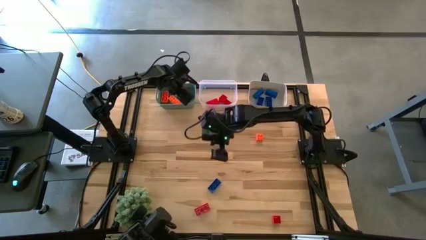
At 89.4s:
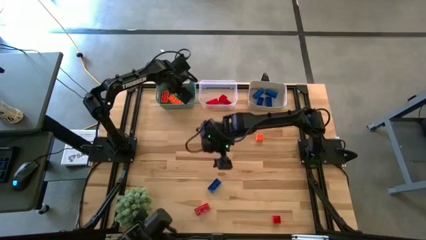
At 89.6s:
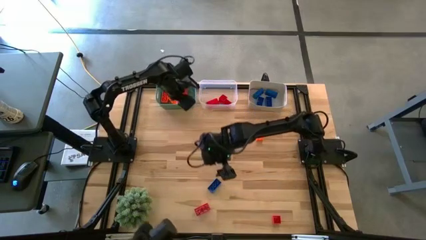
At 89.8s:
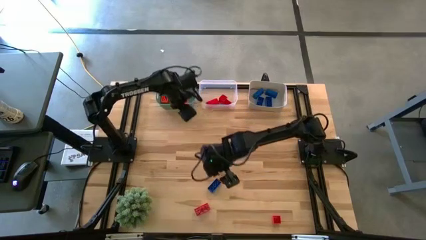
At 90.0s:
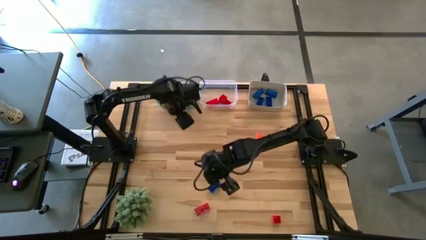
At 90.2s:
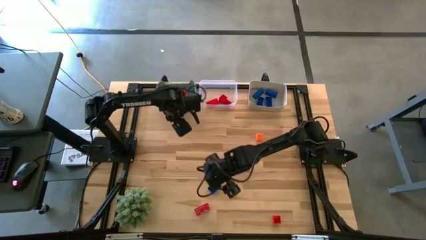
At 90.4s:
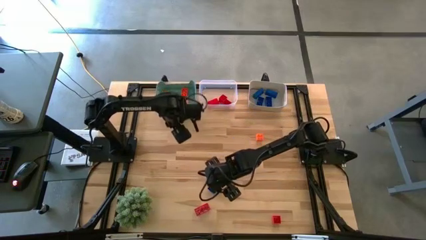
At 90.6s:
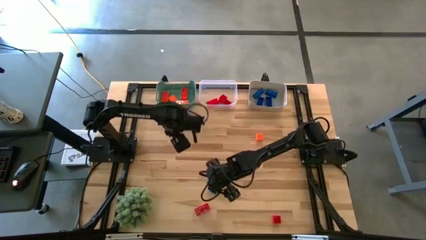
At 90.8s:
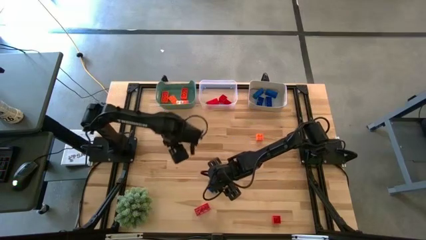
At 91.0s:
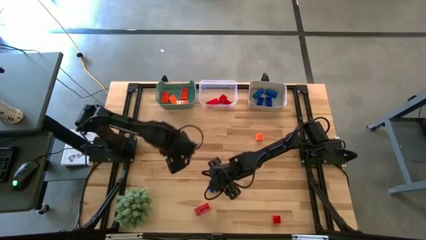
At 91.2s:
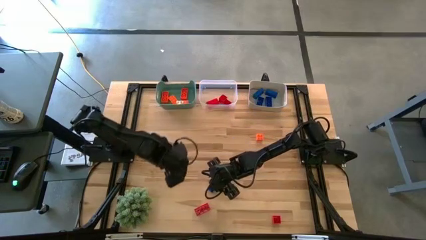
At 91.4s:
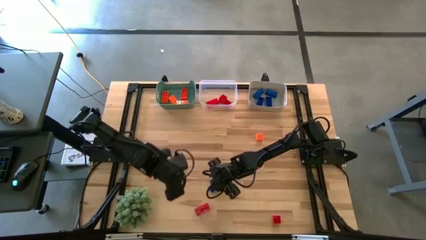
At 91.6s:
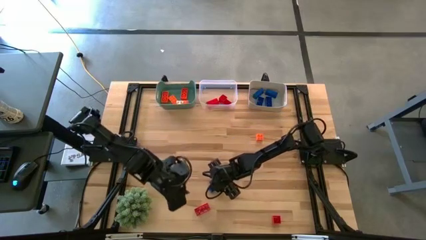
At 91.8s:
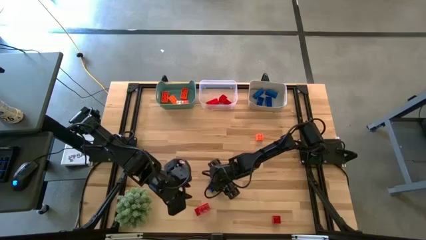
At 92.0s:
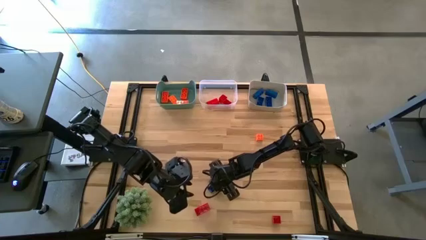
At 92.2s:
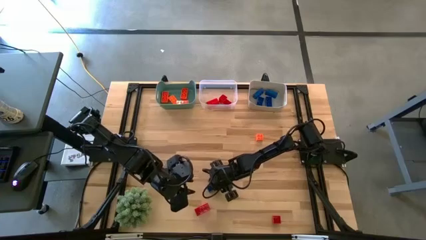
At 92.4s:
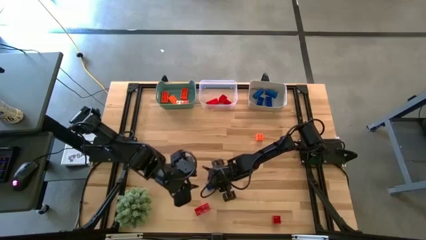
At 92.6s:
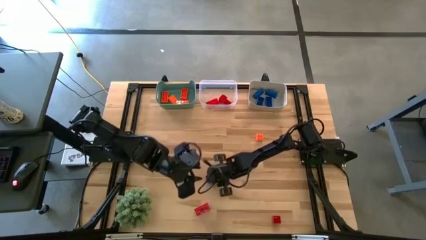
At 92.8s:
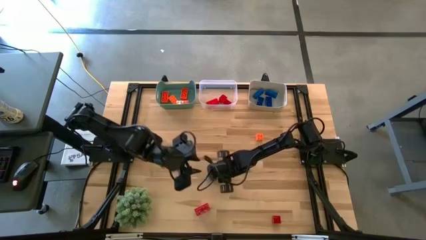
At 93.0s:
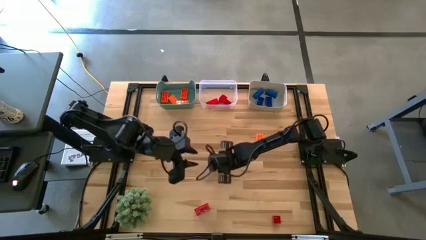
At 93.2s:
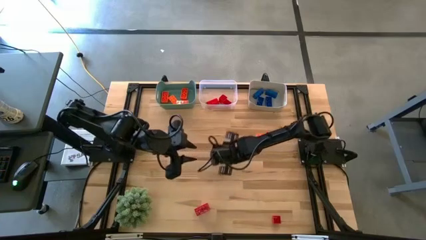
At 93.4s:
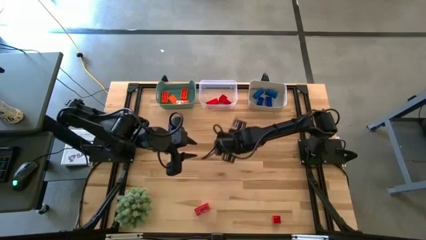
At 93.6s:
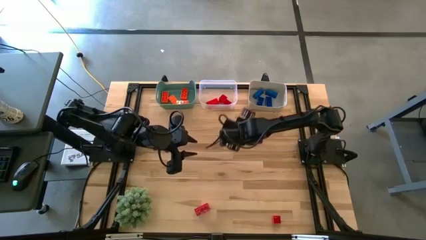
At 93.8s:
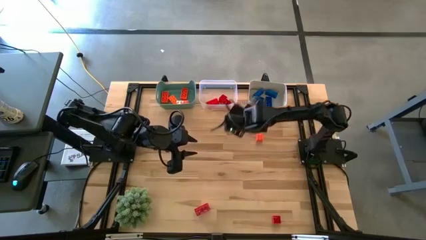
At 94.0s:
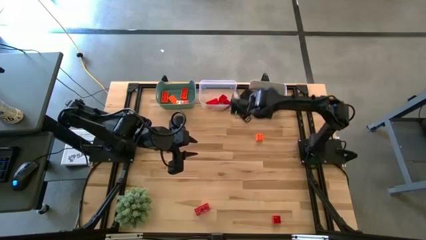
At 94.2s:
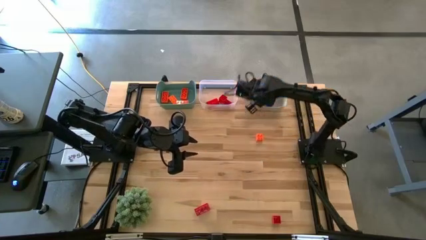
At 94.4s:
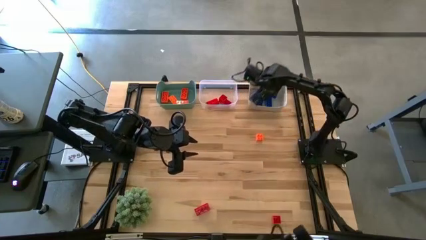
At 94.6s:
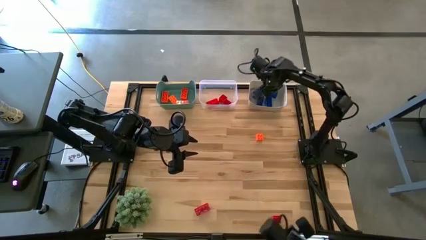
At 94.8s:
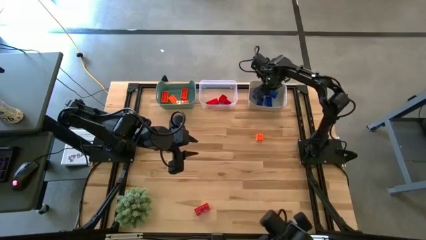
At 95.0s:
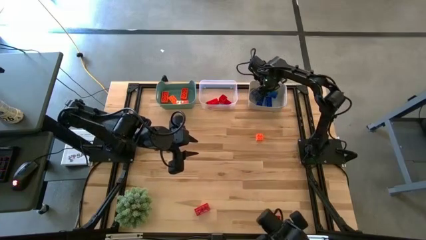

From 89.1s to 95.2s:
Task: Sort & place blocks by color
Put the blue game piece into the gray bin

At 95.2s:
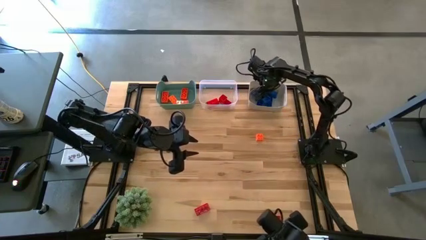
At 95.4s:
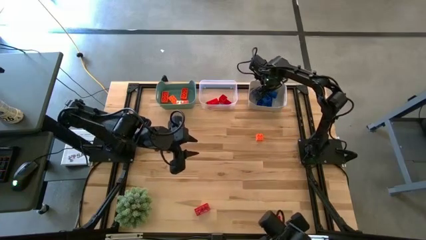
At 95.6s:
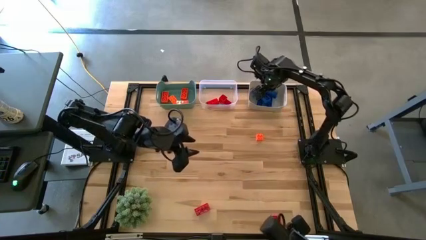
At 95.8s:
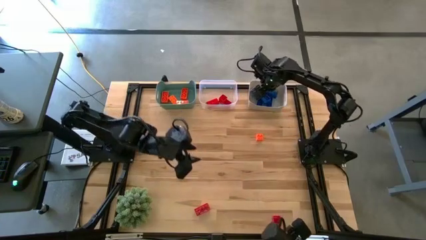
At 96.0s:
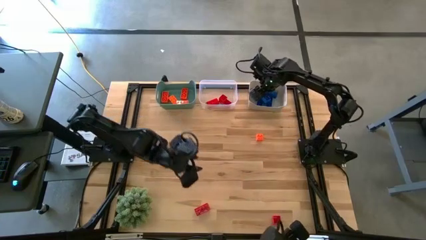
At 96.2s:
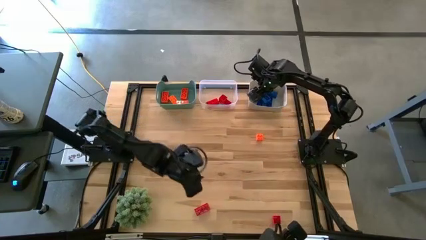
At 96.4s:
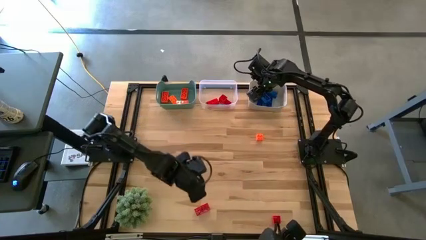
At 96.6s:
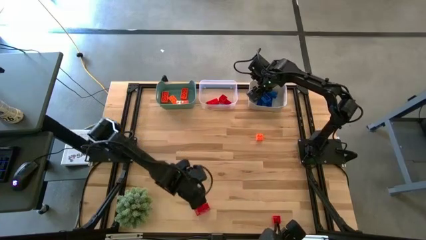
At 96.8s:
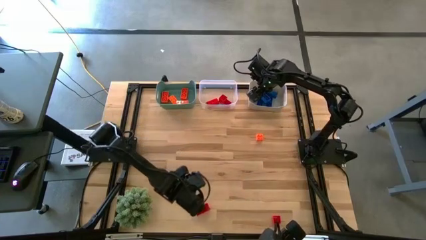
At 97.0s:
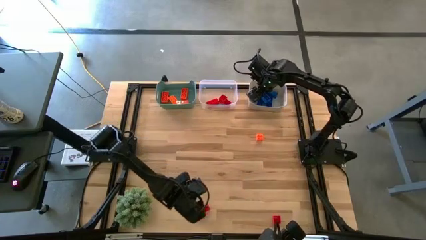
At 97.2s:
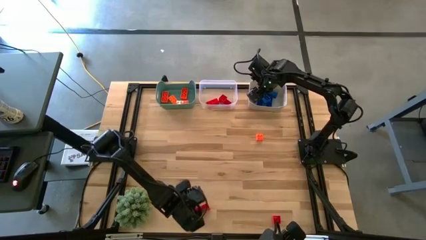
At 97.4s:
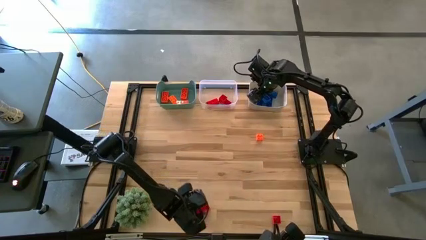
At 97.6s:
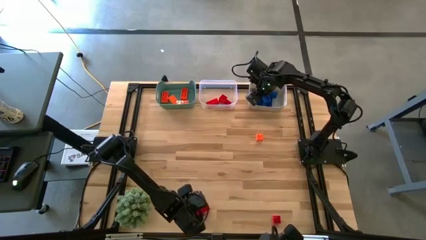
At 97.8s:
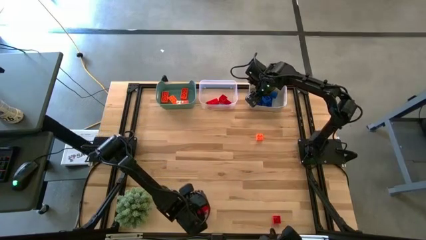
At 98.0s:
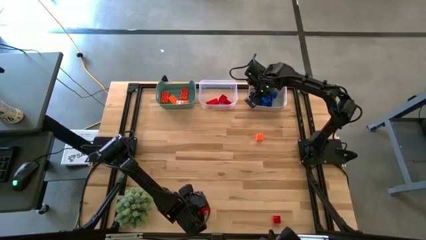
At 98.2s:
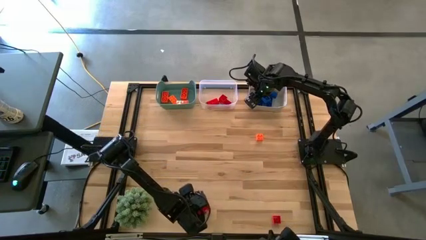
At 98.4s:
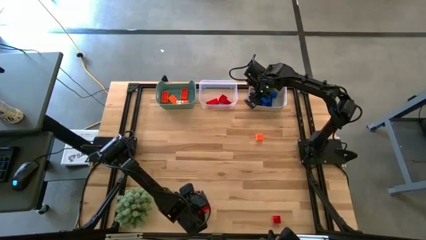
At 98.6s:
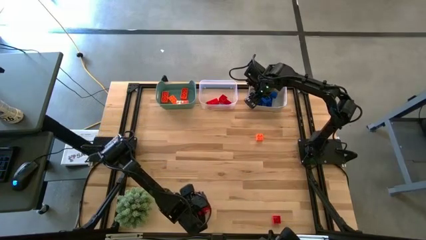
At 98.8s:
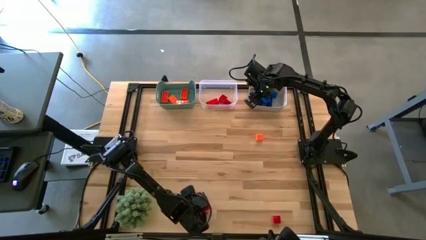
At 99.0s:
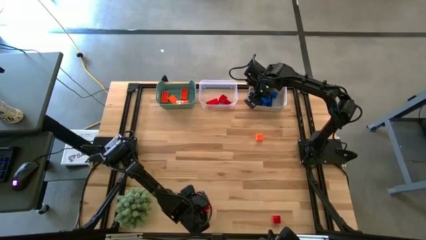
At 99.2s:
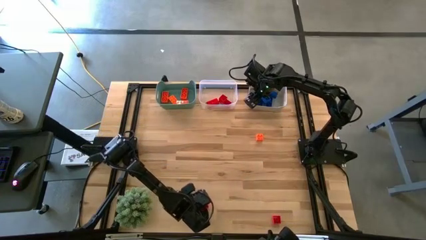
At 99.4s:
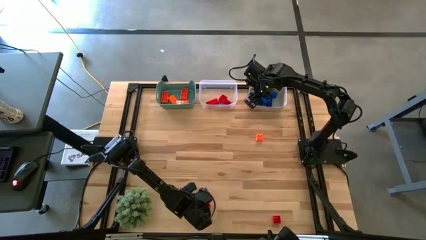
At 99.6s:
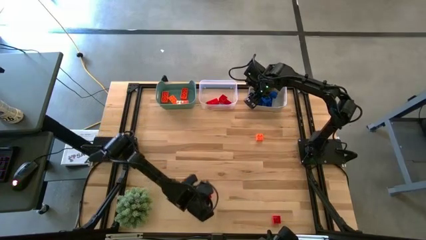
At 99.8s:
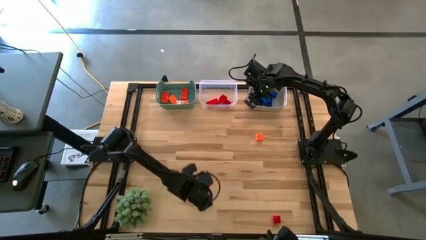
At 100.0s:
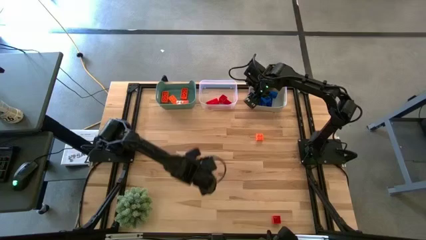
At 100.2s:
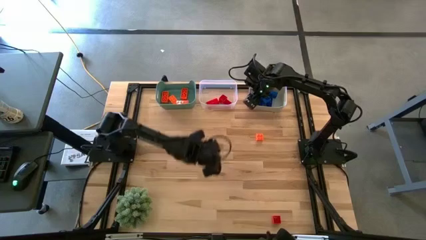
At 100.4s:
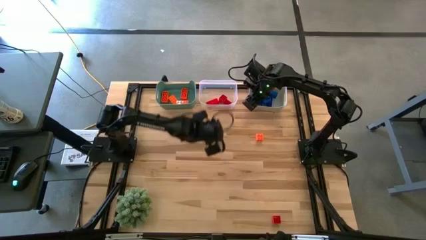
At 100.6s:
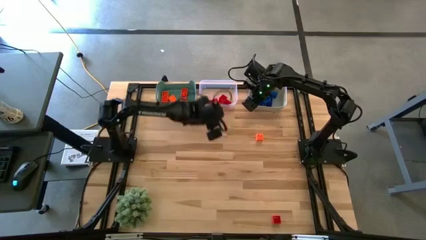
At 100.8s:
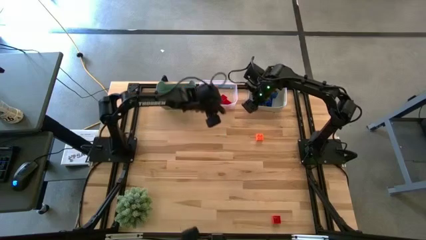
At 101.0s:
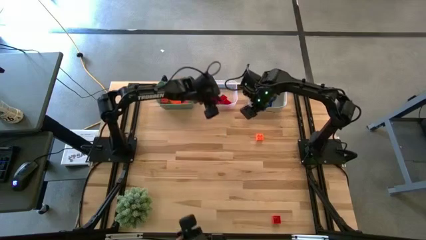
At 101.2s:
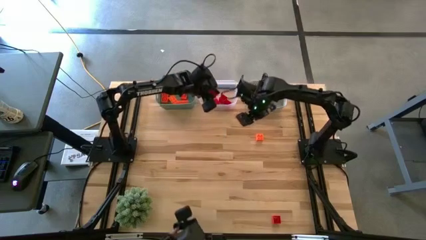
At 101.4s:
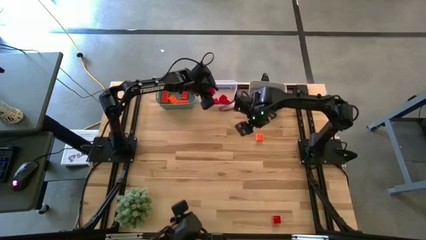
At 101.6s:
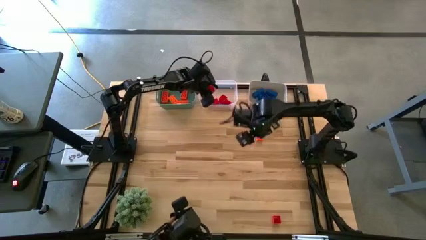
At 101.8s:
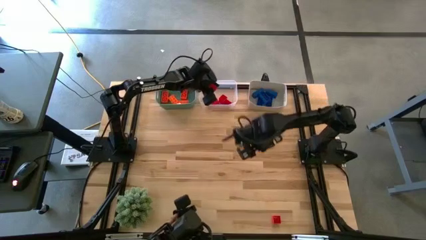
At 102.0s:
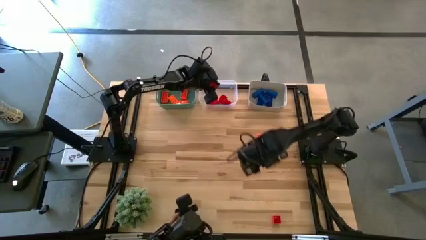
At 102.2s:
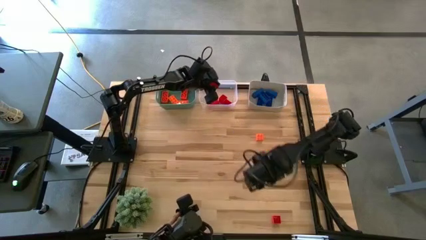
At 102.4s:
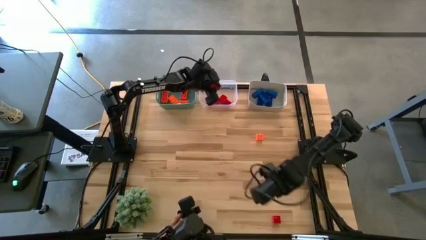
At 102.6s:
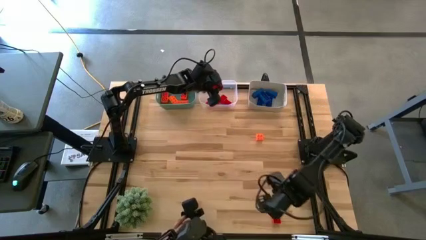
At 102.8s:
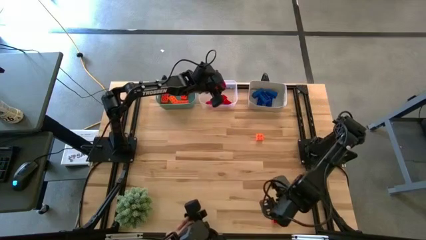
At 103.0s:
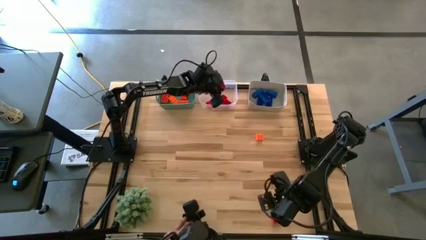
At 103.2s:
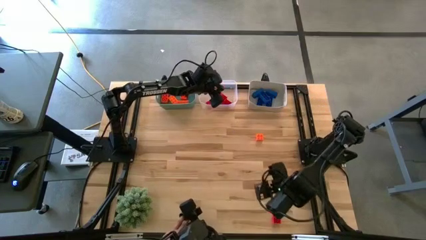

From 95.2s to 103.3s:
Put the red game piece into the transparent bin
